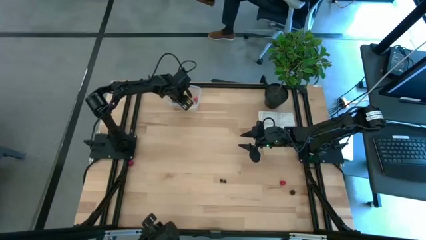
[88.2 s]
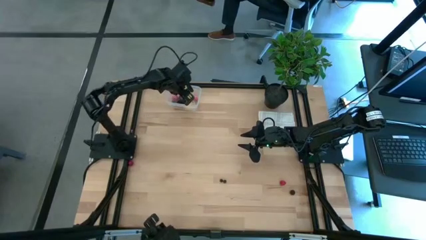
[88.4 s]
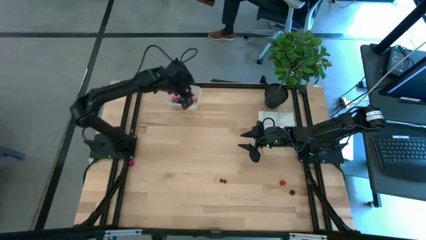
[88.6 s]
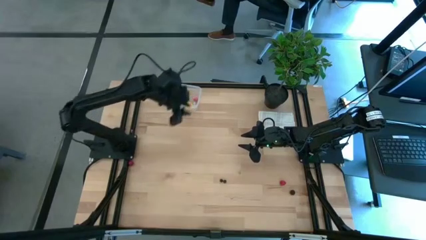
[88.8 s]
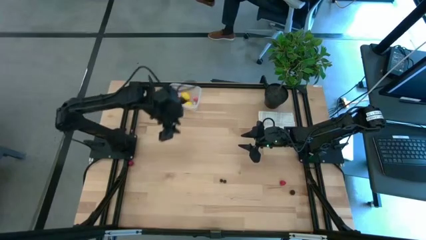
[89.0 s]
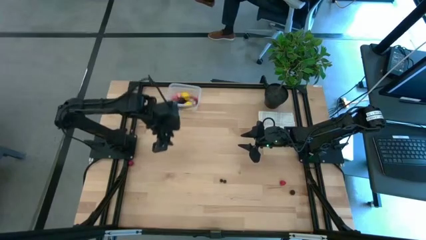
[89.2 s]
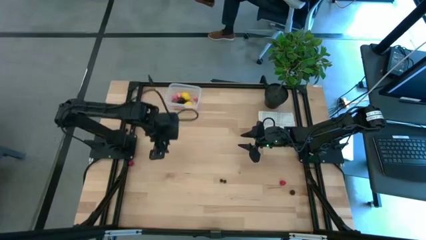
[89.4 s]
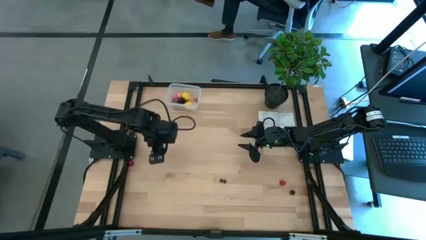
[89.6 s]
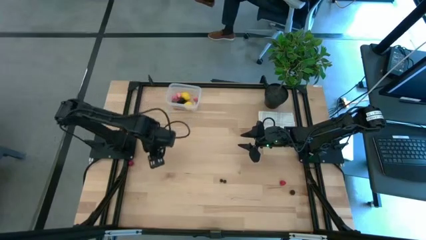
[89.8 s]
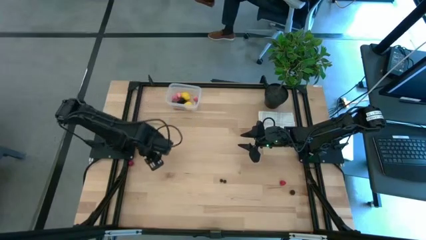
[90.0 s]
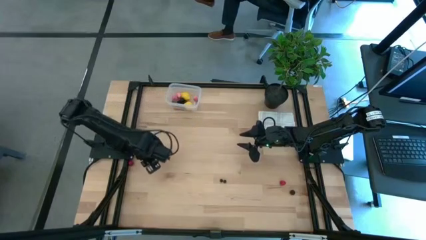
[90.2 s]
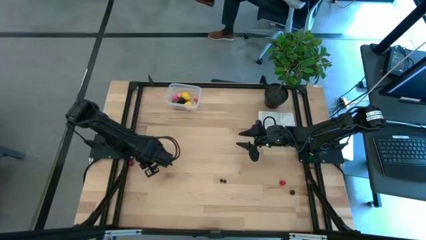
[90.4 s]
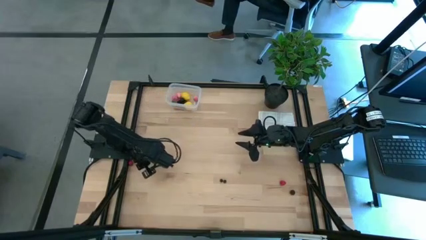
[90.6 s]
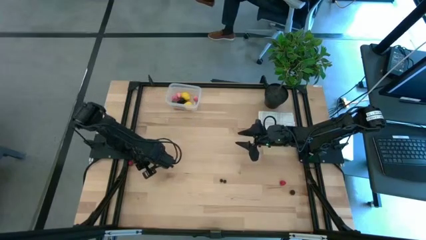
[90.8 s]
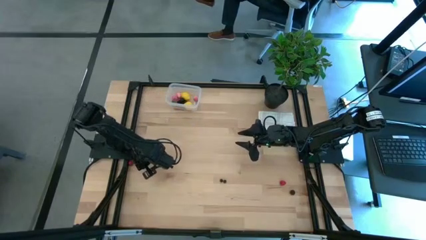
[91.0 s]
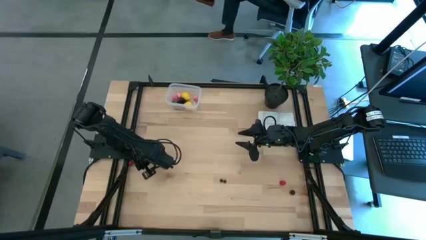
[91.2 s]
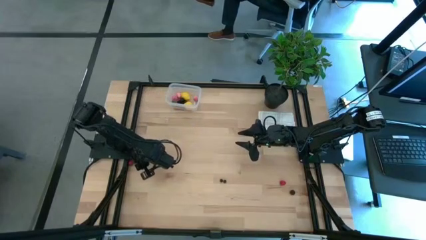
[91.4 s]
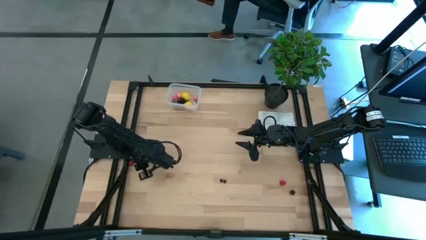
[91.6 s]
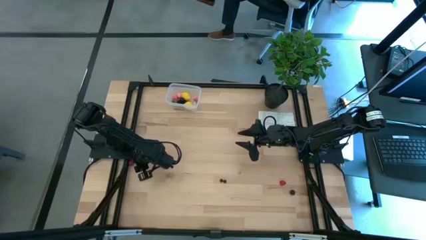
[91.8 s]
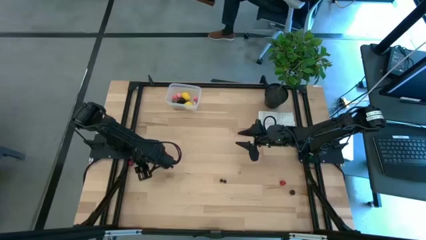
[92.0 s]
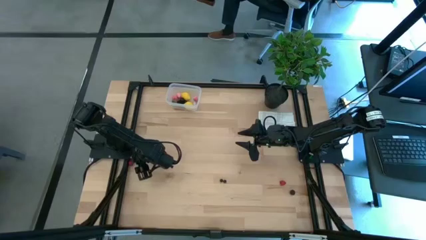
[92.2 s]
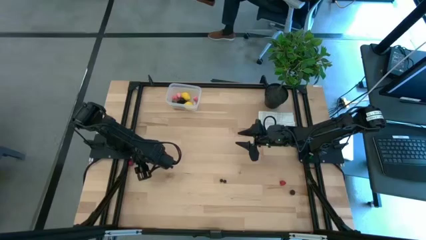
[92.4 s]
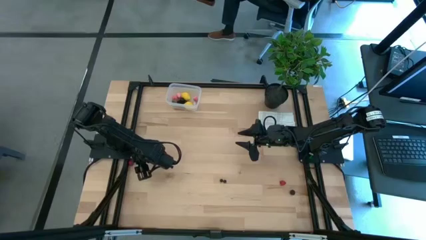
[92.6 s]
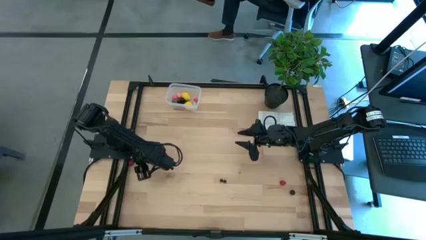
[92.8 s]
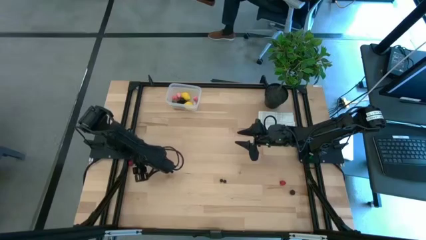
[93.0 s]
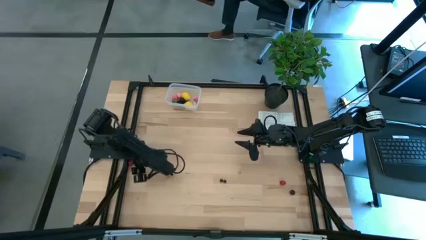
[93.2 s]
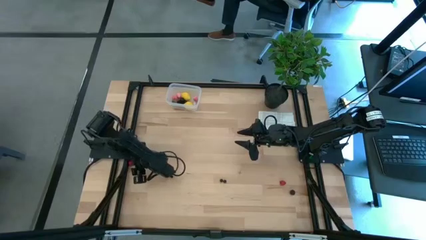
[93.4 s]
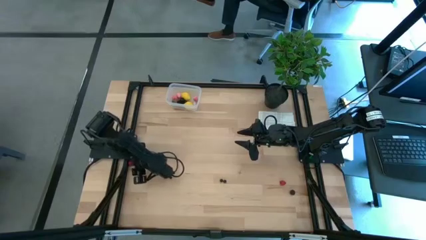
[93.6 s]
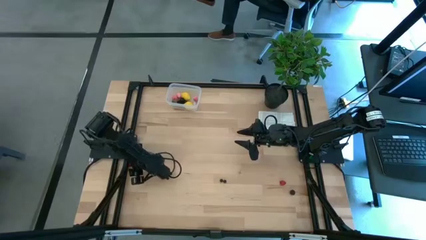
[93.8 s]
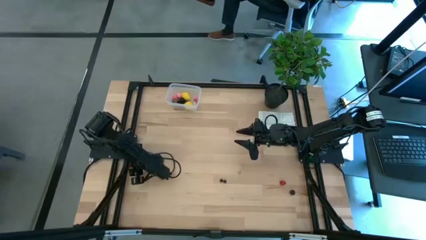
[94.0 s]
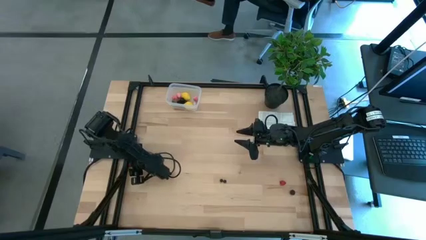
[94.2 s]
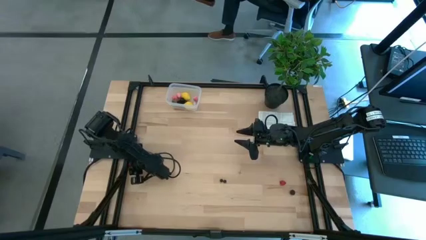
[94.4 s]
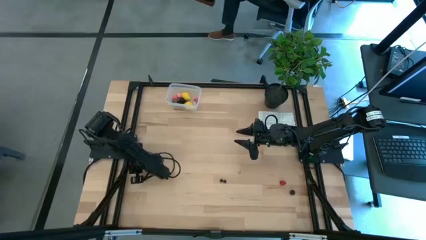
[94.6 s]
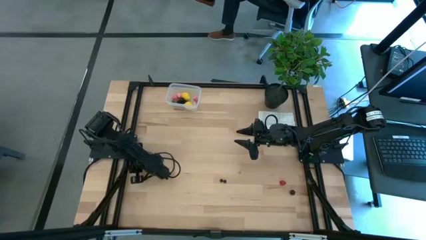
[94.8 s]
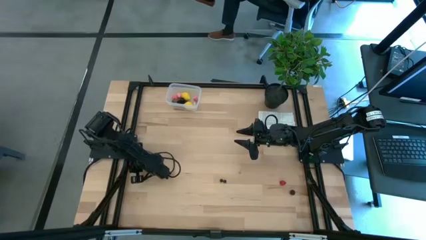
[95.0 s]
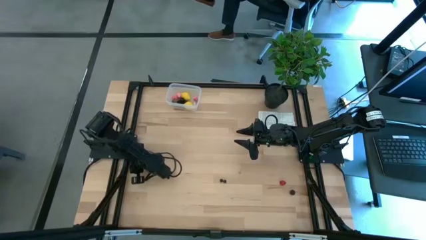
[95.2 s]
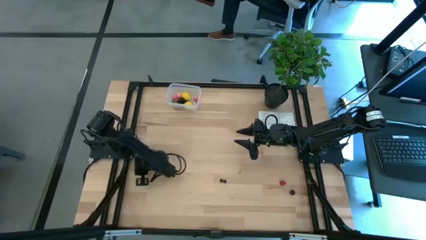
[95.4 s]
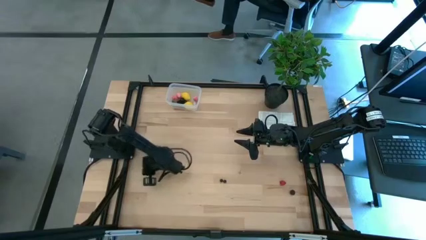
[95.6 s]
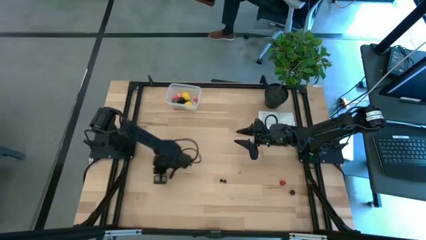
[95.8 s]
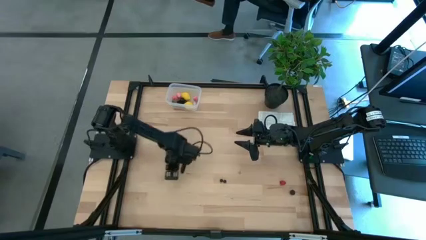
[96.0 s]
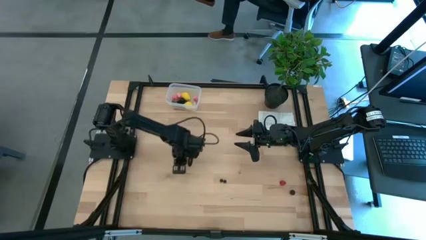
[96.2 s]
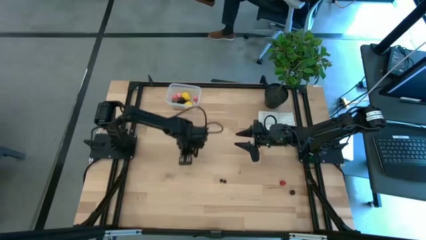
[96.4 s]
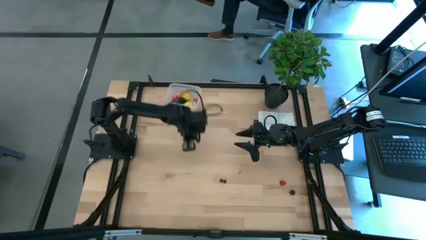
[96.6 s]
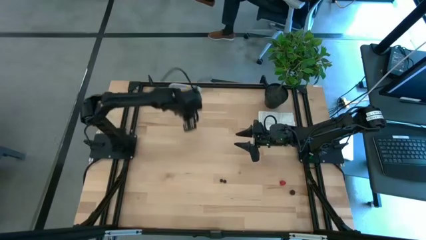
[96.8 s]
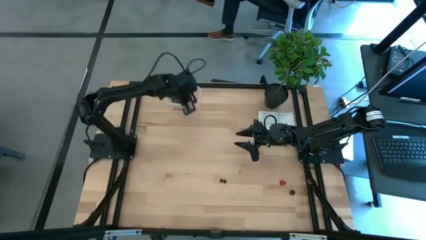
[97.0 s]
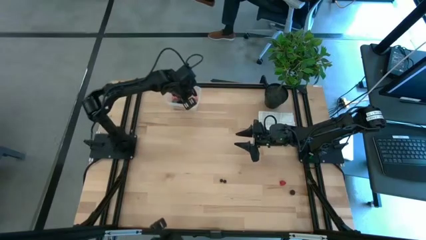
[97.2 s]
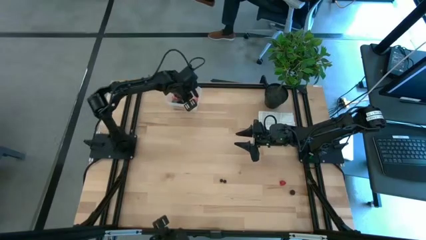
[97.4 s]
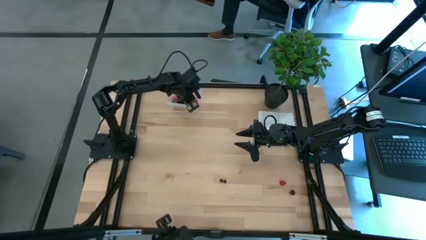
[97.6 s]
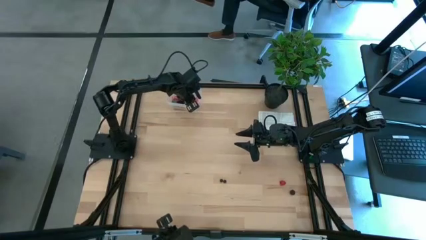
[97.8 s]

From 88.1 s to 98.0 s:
Task: Pick and placing Produce into tupperware
Put the left cherry into the transparent bin

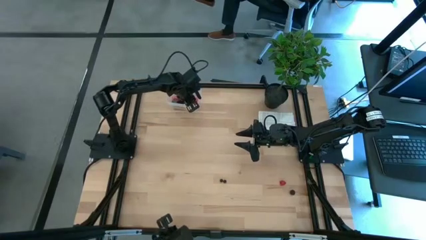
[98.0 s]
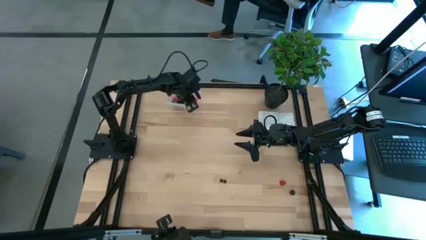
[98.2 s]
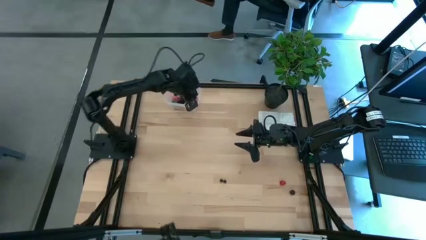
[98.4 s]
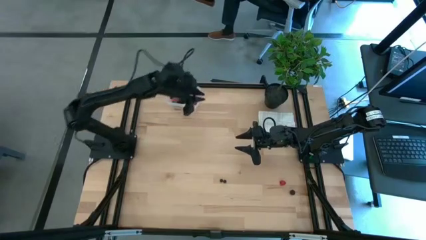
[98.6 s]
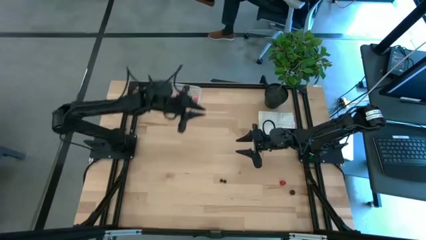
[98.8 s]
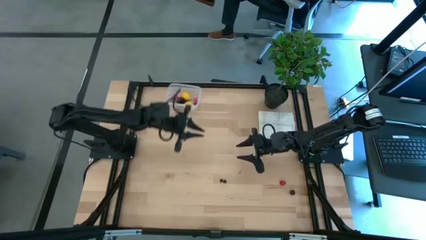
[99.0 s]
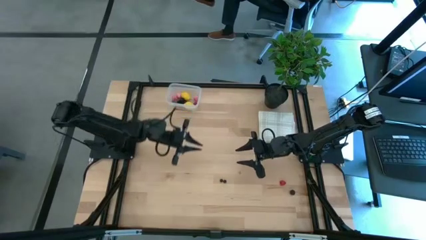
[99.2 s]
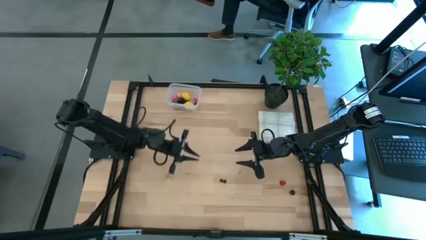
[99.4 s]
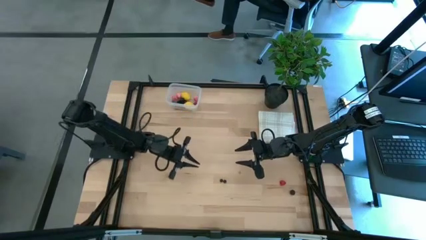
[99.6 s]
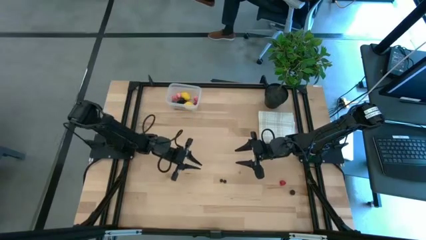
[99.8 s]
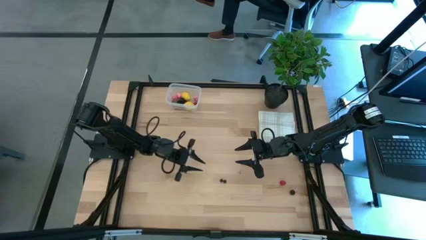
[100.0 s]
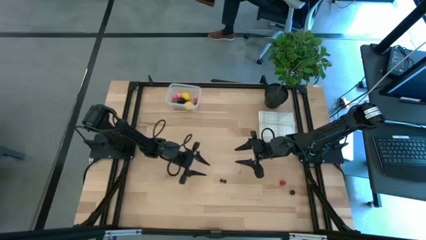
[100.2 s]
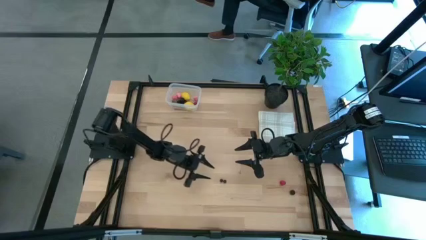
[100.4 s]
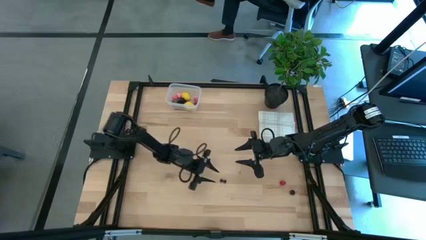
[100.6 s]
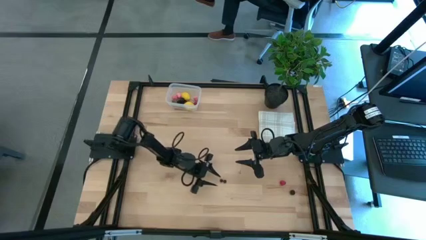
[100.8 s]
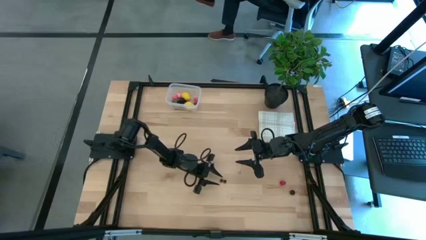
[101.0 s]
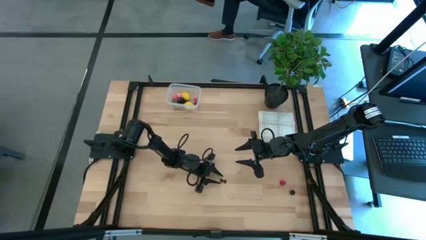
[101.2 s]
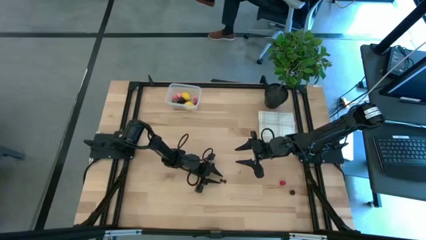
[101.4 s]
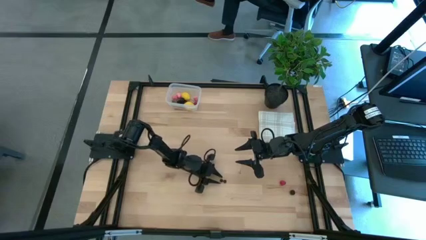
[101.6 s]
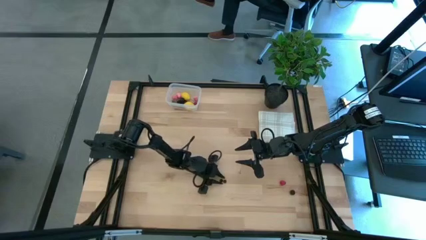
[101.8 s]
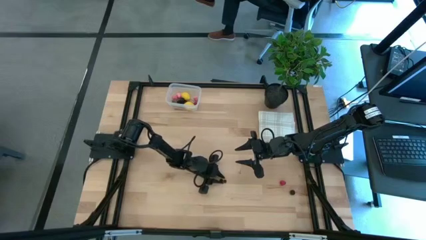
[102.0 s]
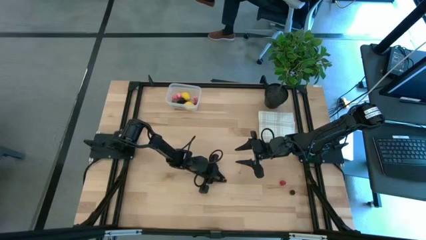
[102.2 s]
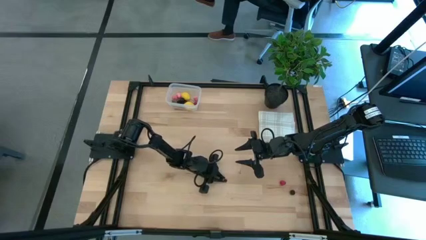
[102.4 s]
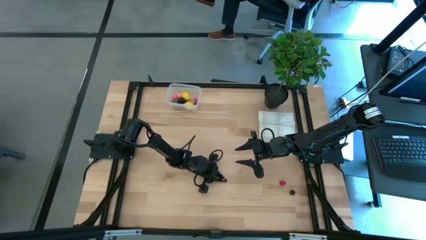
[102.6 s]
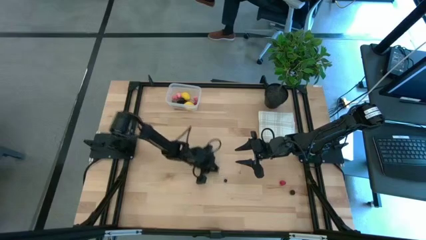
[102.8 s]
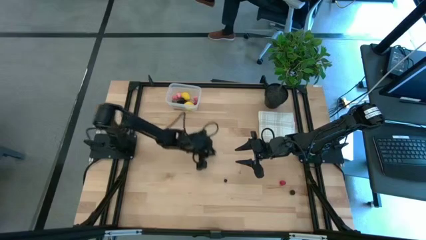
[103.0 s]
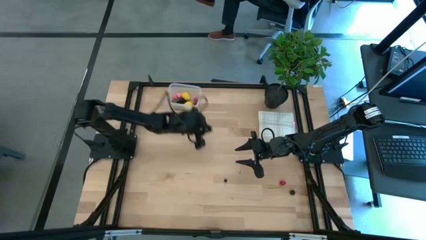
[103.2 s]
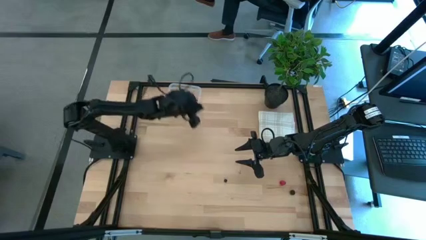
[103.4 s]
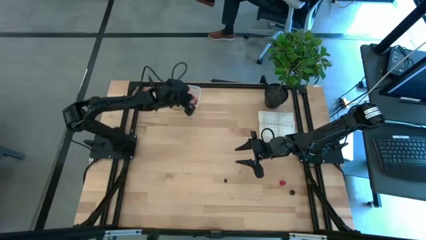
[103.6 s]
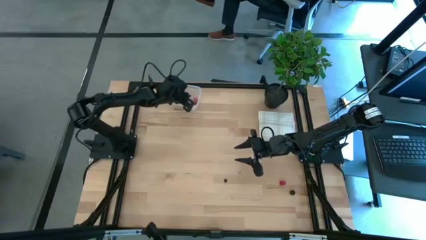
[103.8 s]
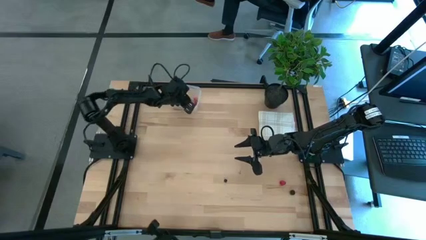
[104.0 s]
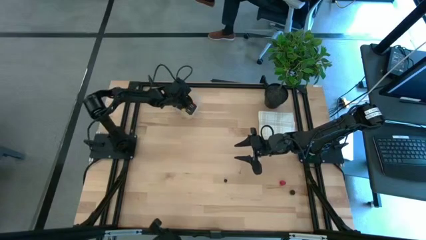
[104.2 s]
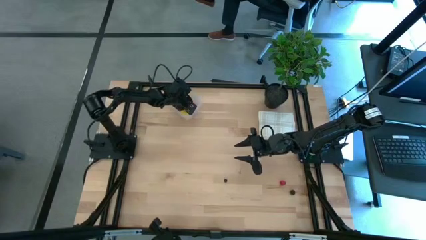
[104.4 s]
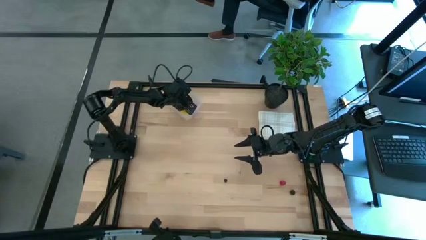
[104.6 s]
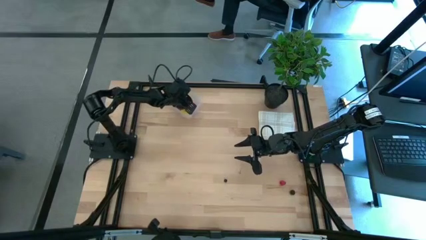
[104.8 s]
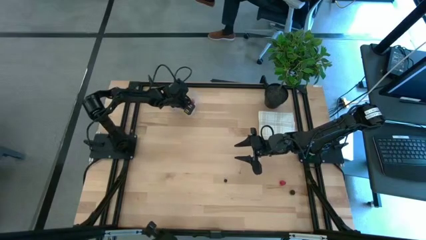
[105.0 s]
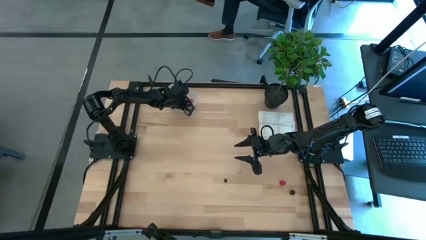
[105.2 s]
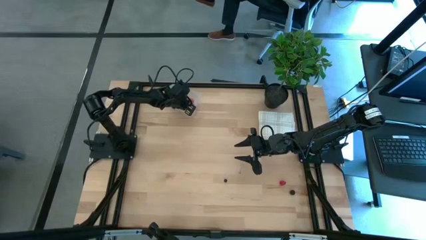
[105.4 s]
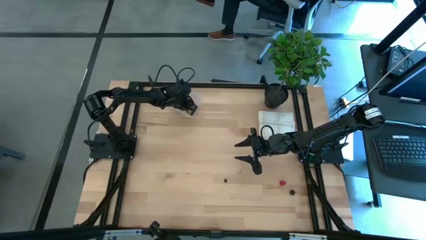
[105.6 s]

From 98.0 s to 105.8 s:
Put the left blueberry into the transparent bin
